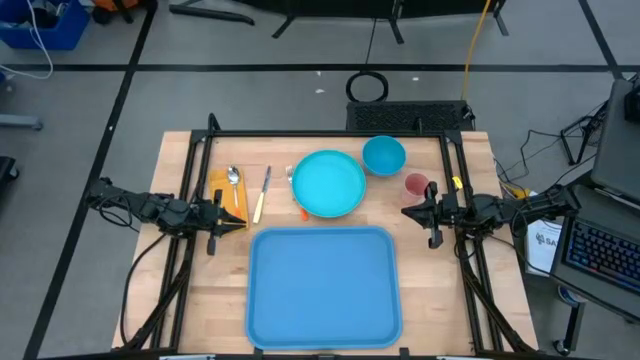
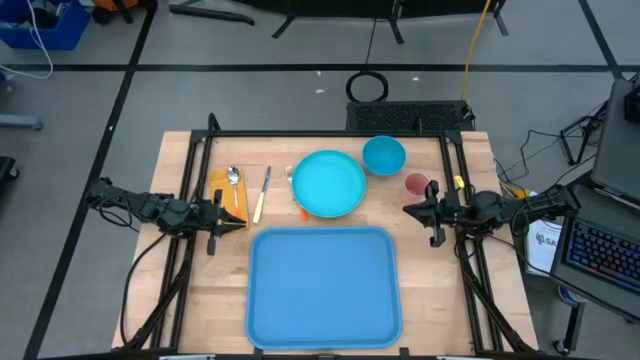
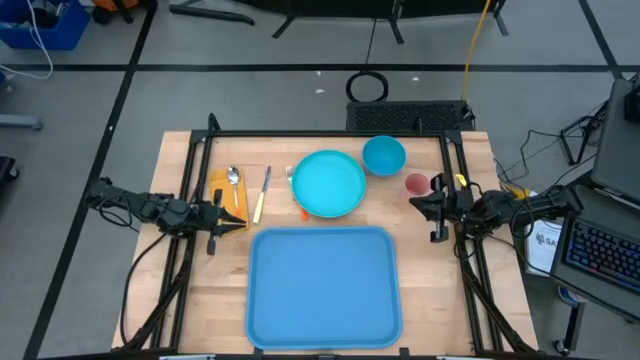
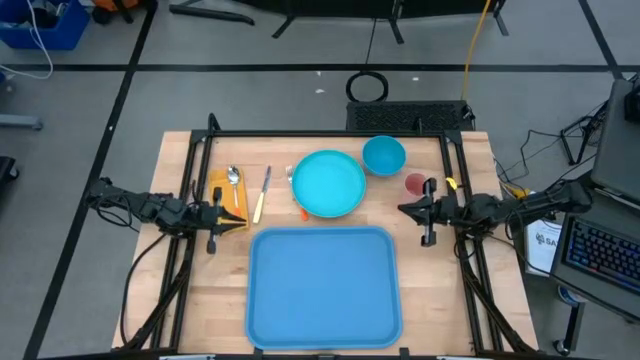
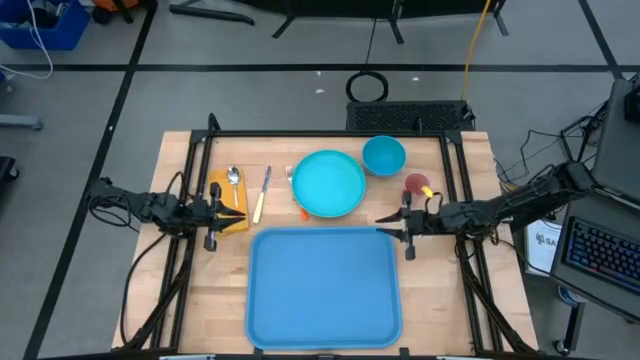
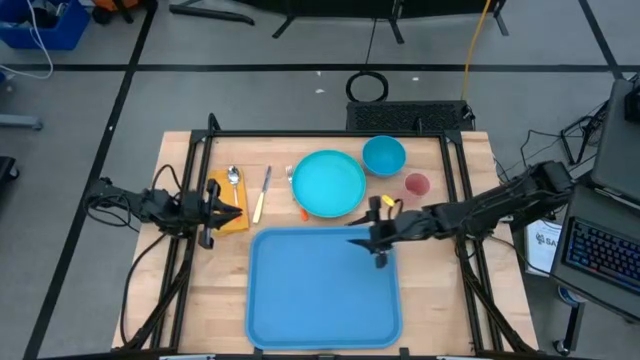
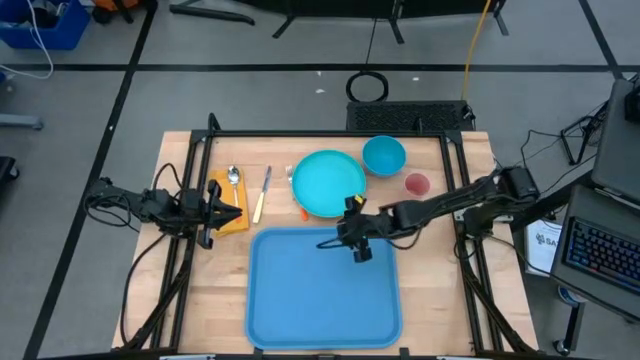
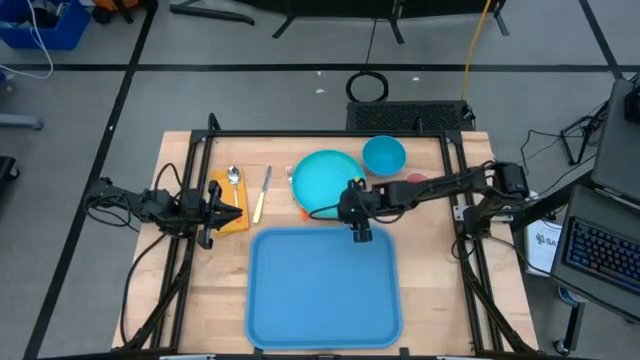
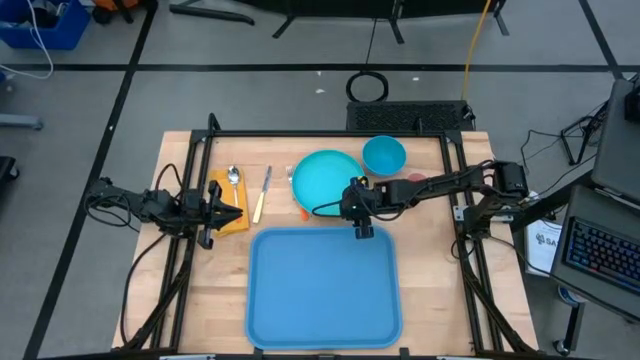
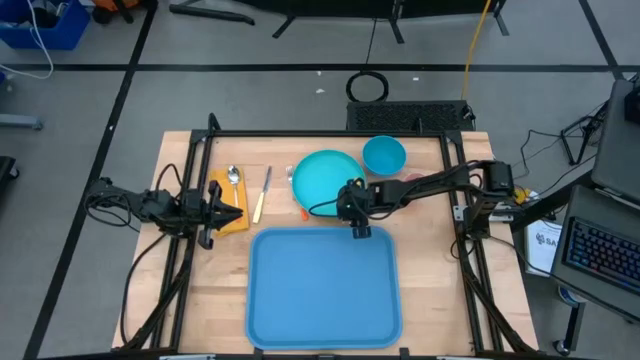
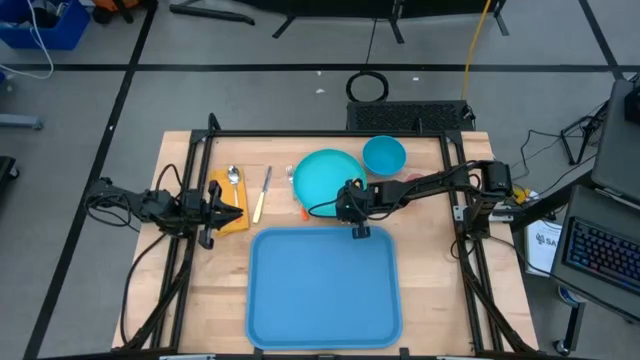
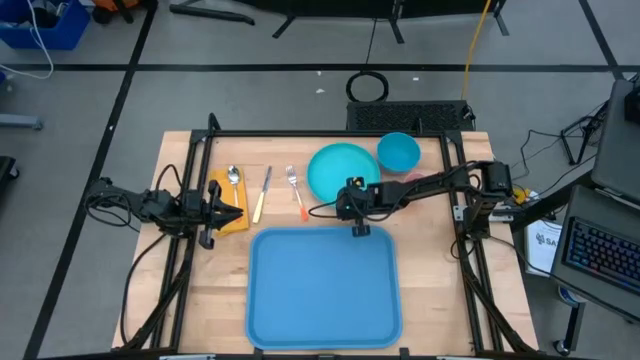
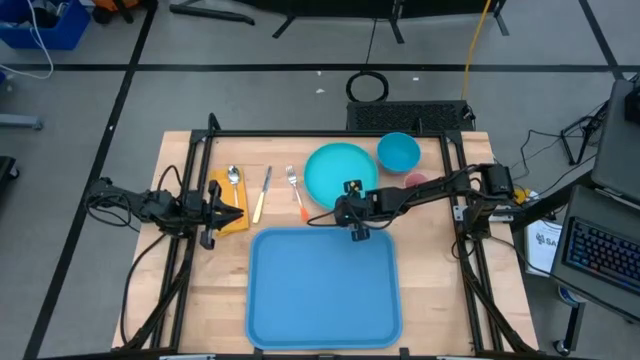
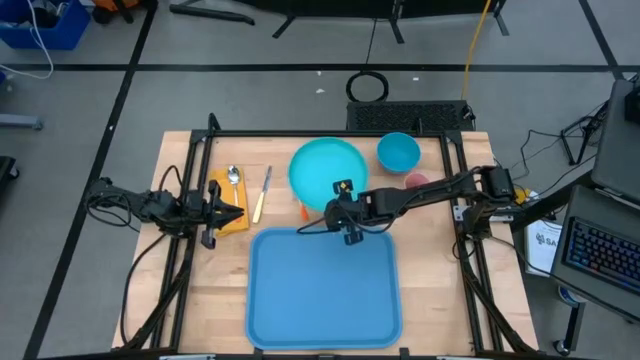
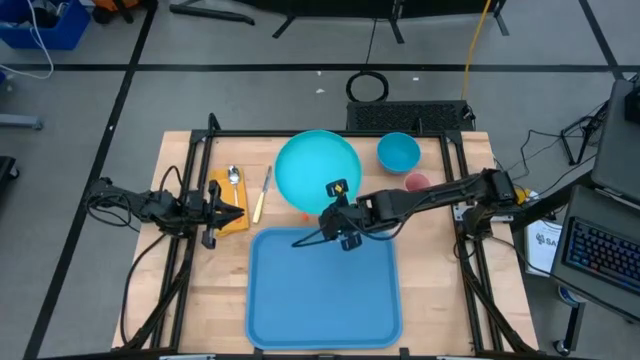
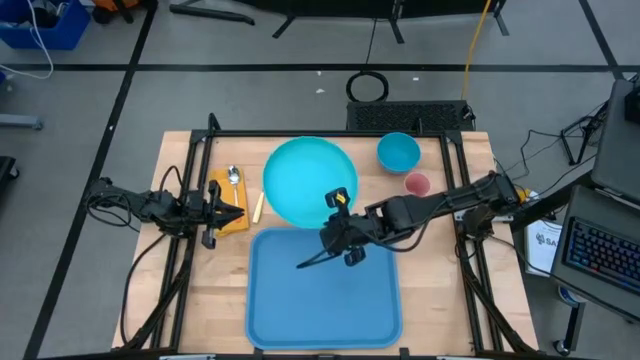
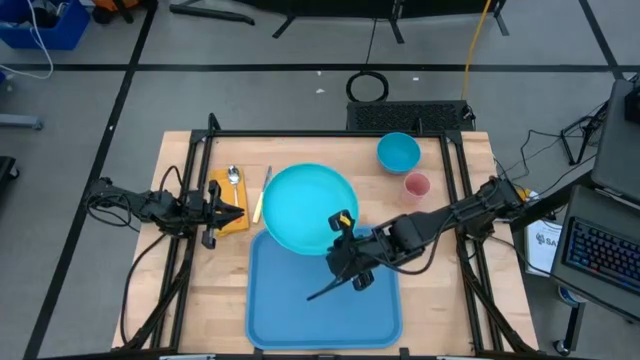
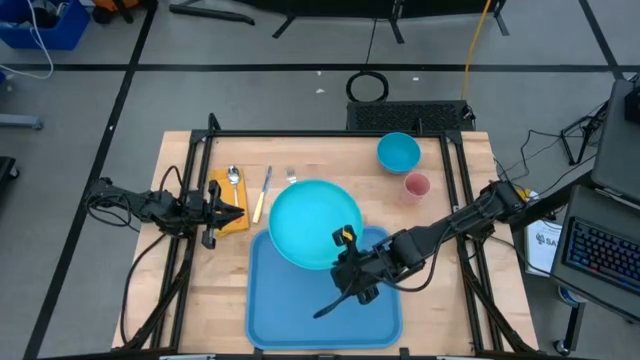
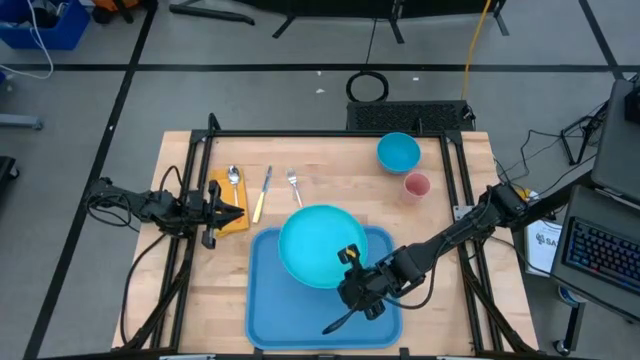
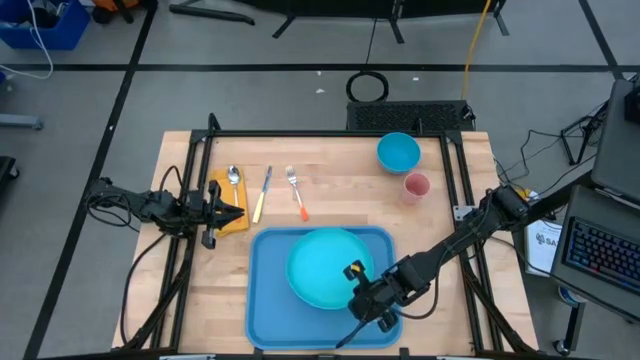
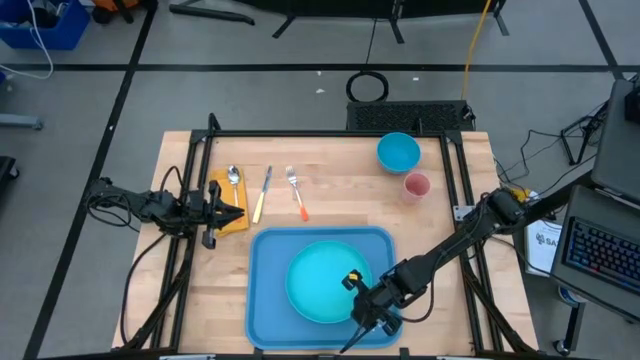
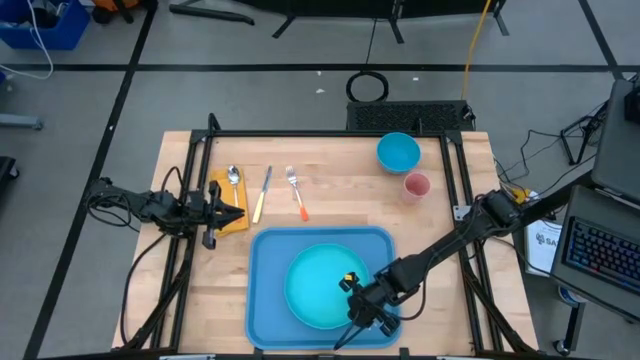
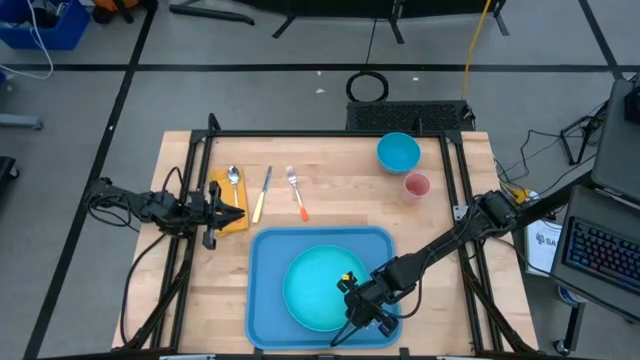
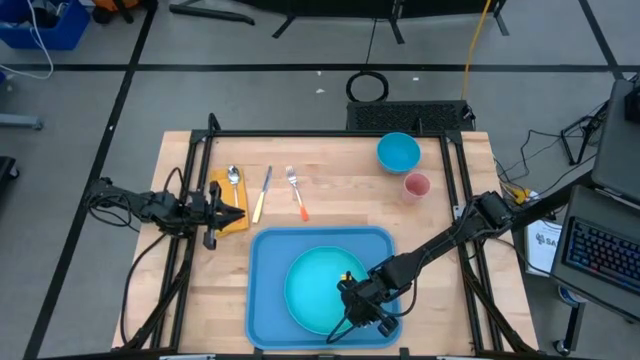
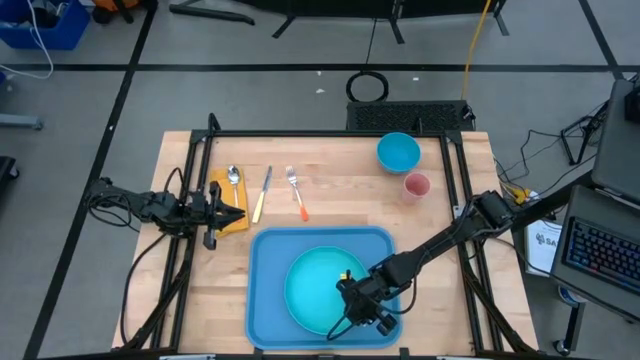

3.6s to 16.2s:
Task: Set up tray
Put the blue plate in the center on the blue tray

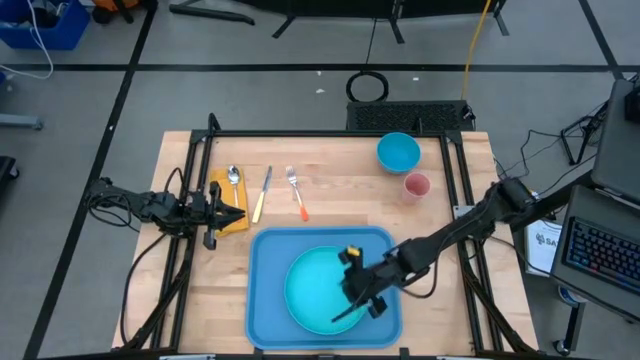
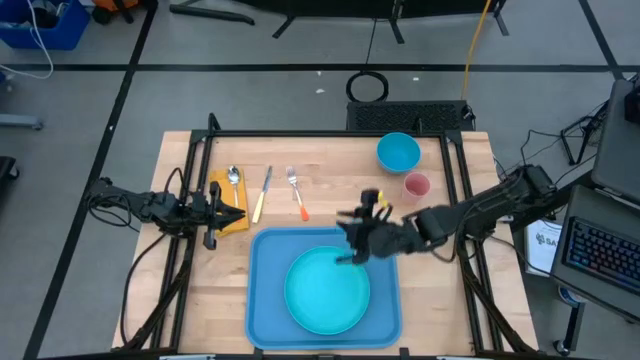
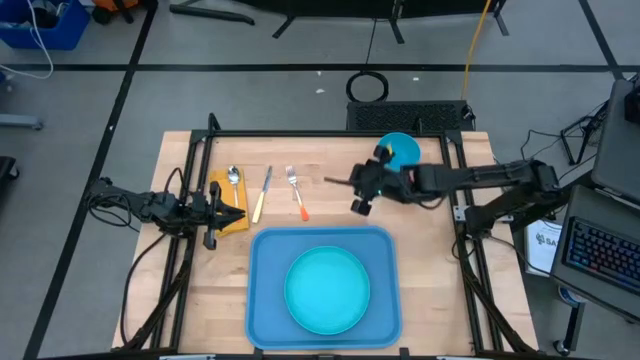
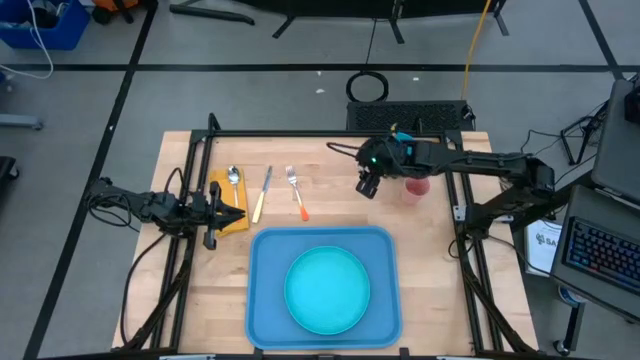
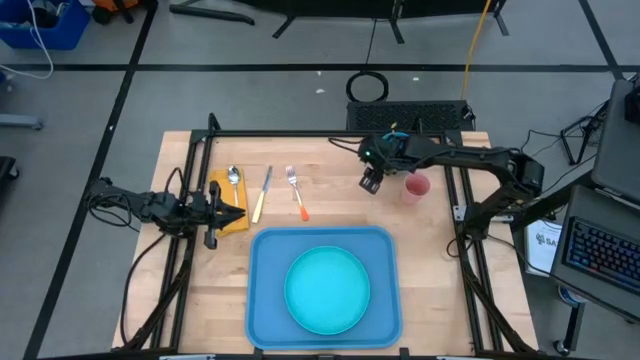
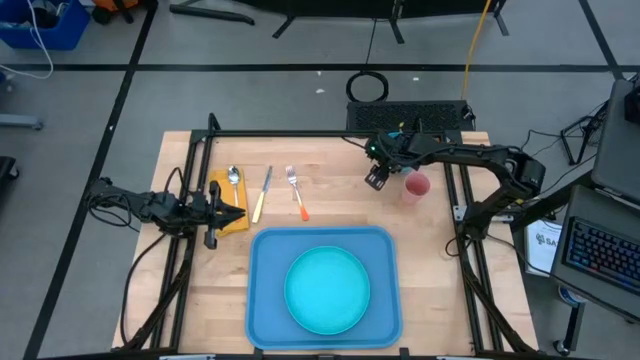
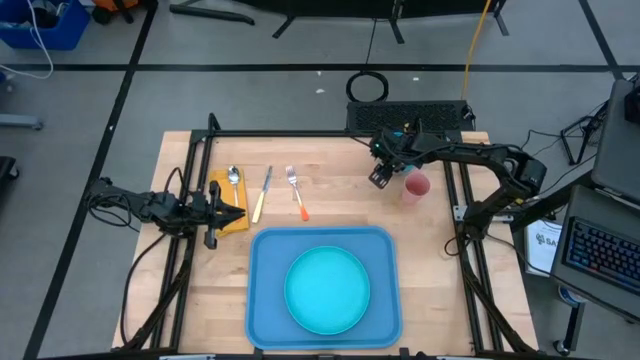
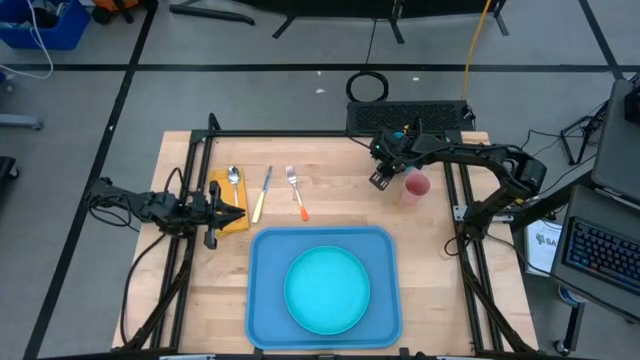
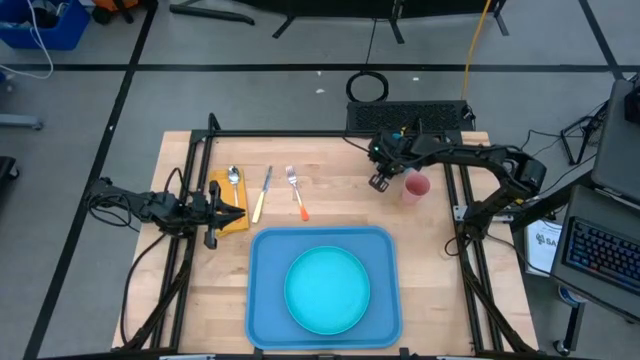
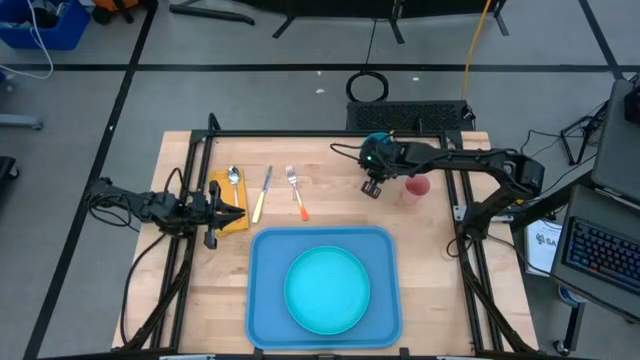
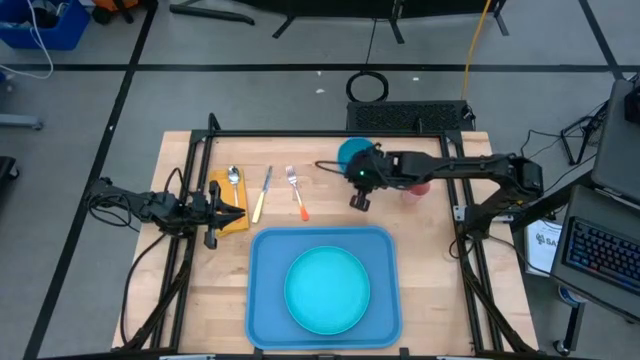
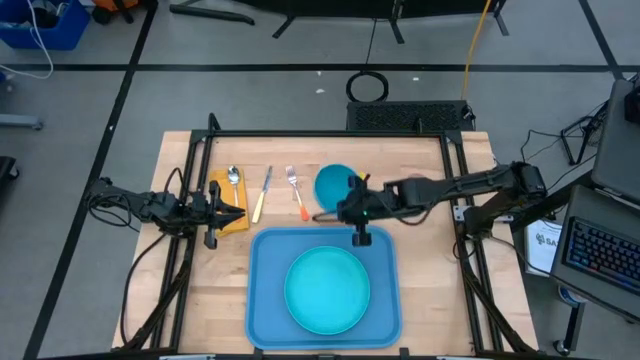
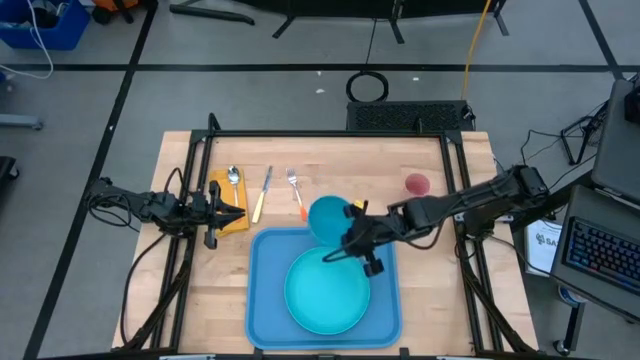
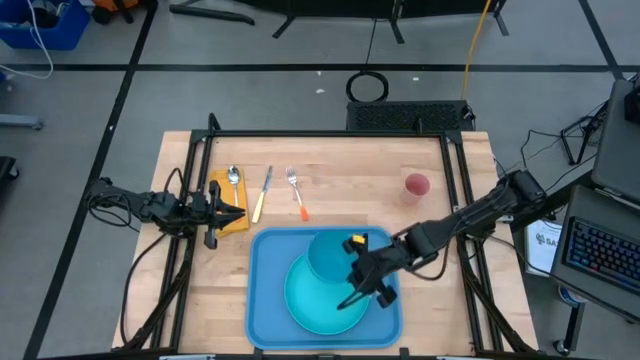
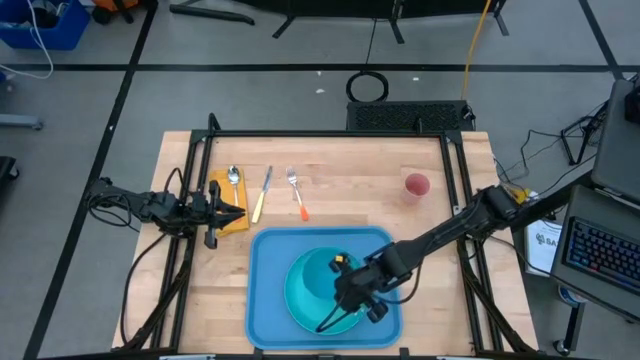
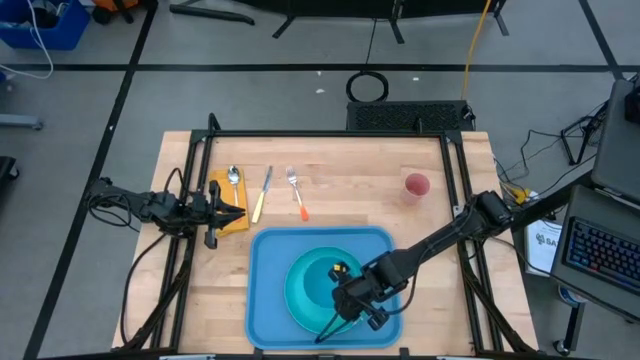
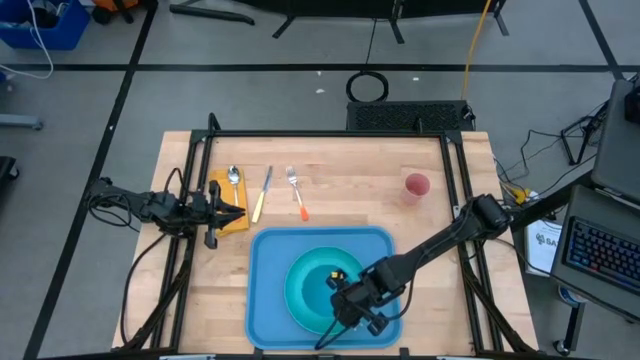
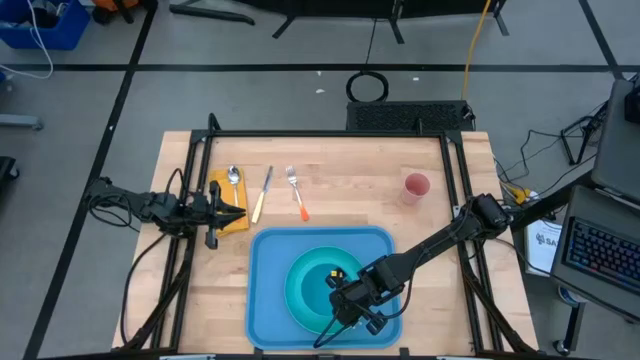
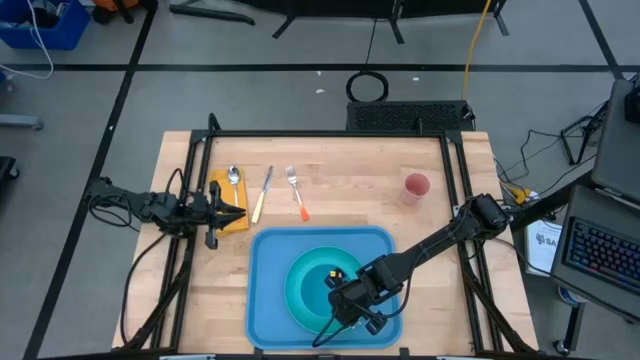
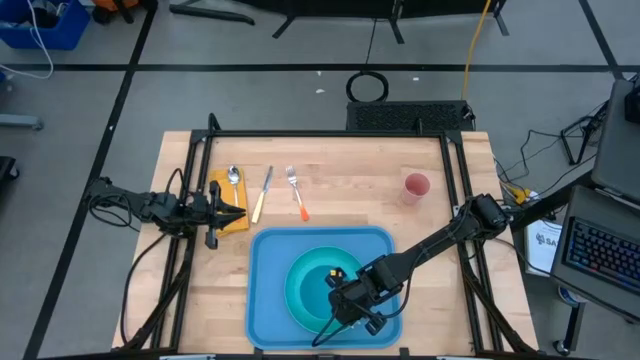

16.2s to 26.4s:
Put the blue bowl on top of the blue plate
